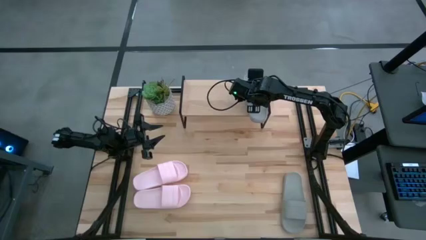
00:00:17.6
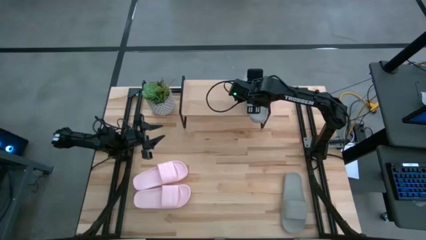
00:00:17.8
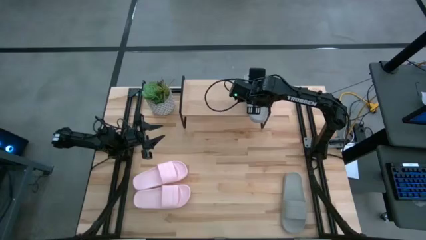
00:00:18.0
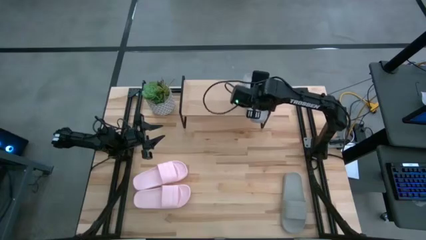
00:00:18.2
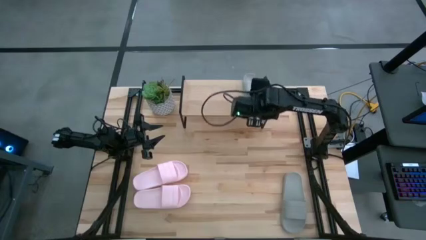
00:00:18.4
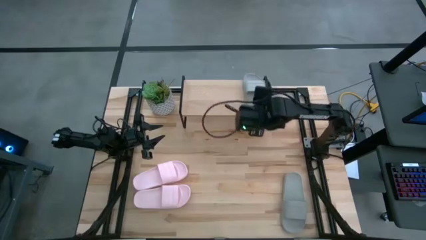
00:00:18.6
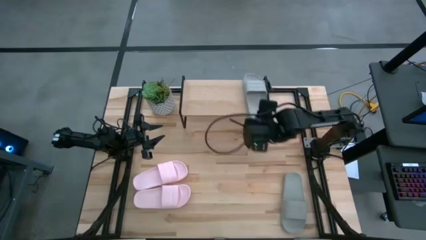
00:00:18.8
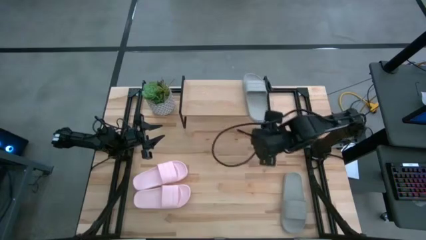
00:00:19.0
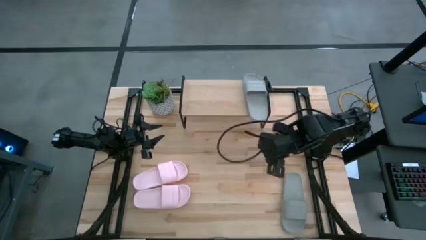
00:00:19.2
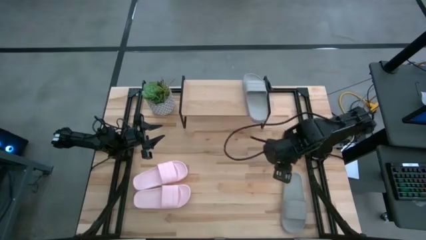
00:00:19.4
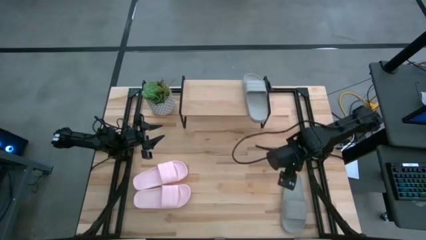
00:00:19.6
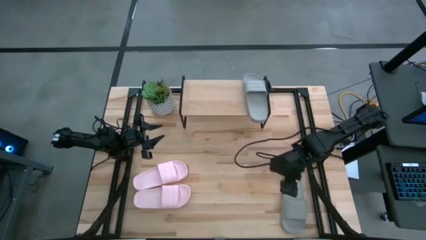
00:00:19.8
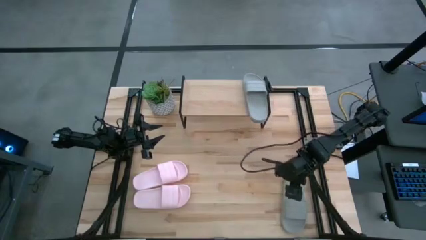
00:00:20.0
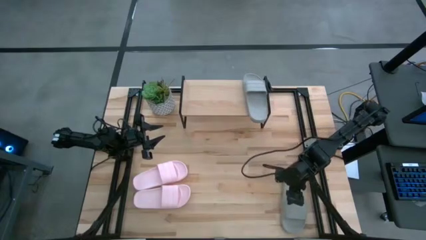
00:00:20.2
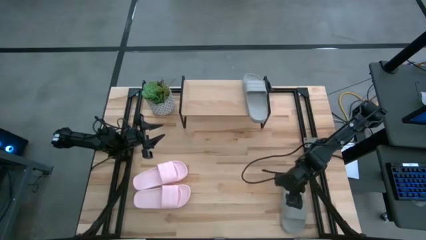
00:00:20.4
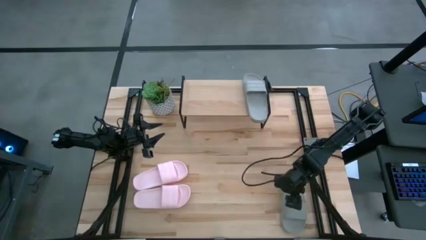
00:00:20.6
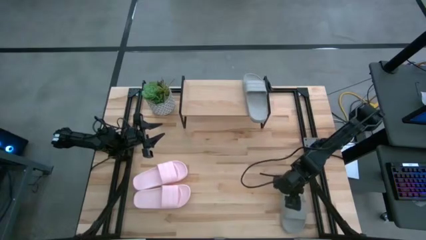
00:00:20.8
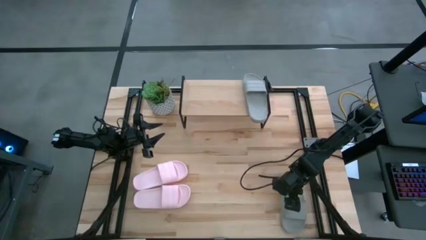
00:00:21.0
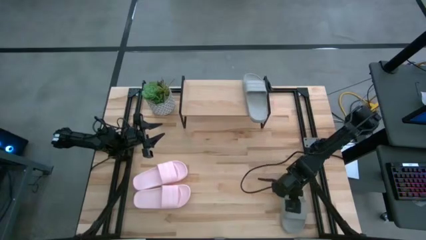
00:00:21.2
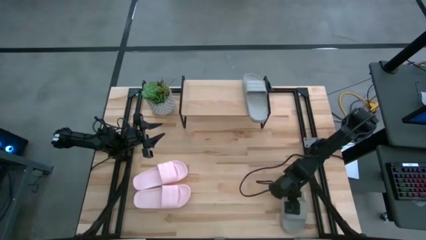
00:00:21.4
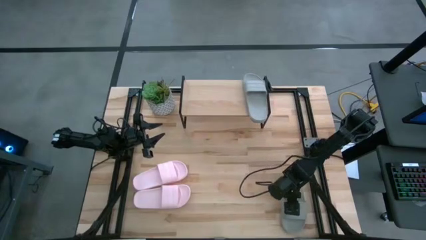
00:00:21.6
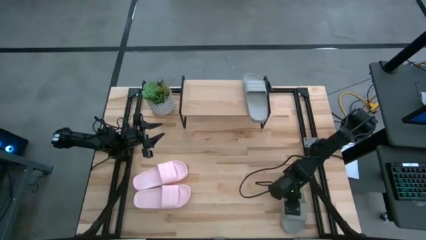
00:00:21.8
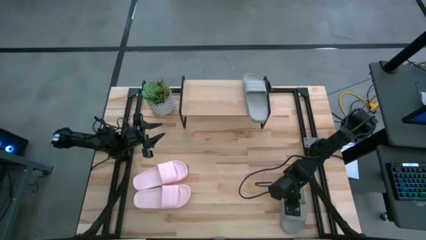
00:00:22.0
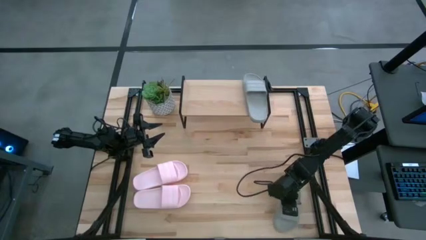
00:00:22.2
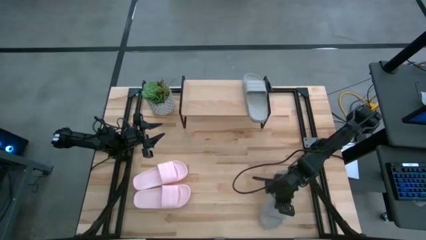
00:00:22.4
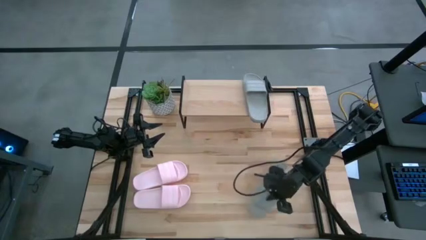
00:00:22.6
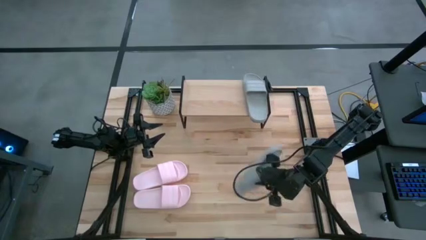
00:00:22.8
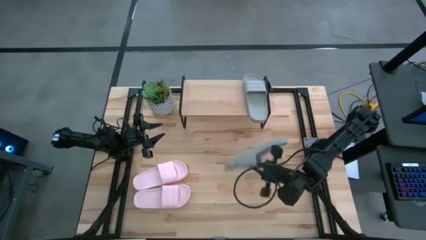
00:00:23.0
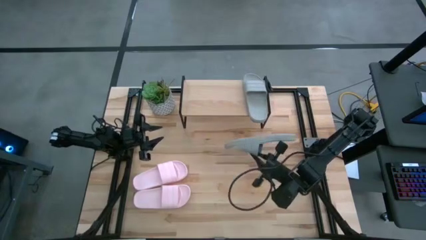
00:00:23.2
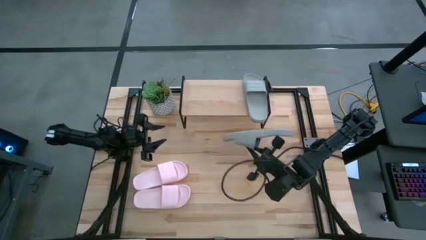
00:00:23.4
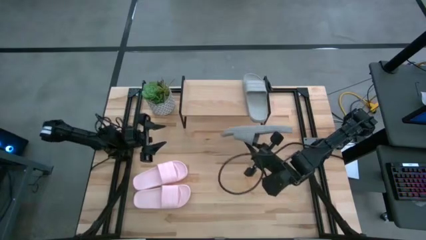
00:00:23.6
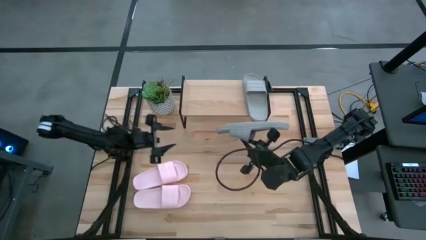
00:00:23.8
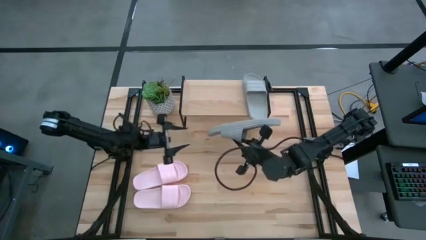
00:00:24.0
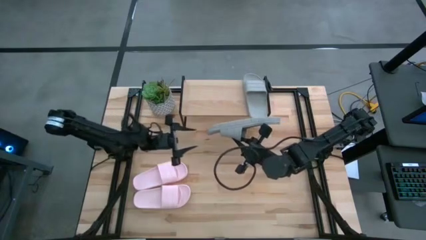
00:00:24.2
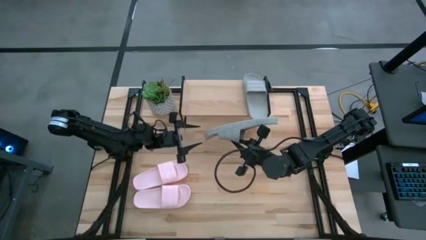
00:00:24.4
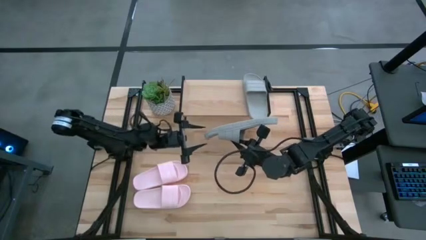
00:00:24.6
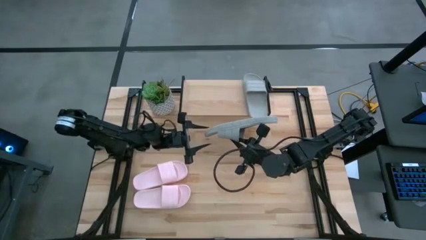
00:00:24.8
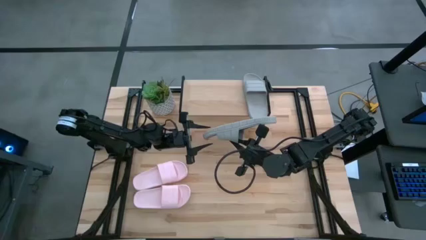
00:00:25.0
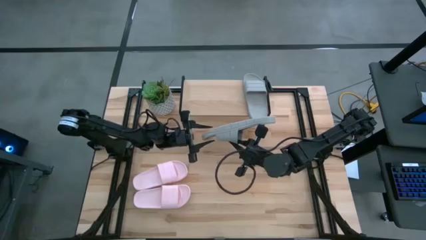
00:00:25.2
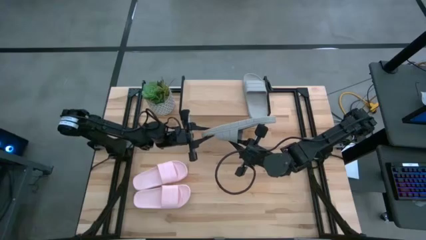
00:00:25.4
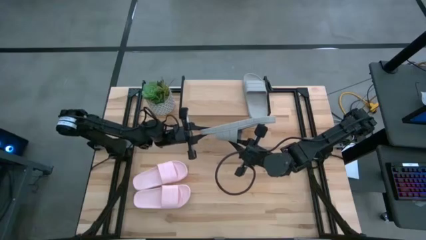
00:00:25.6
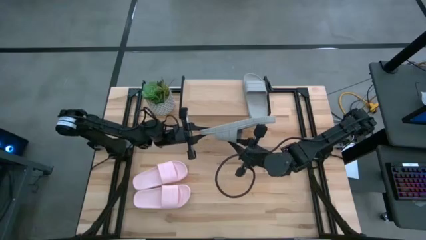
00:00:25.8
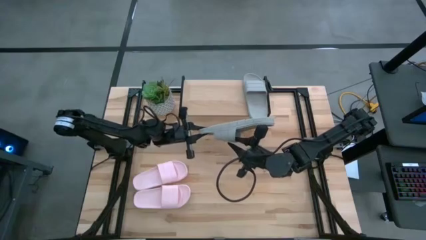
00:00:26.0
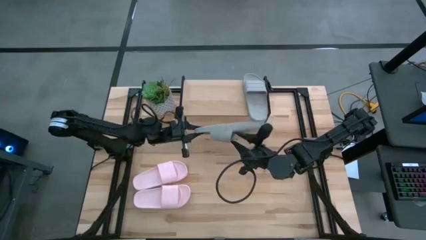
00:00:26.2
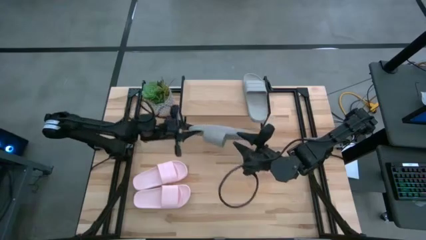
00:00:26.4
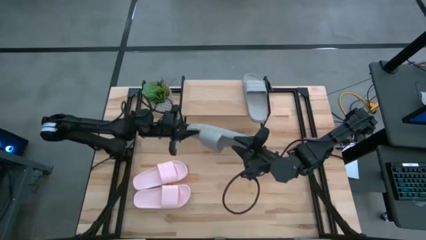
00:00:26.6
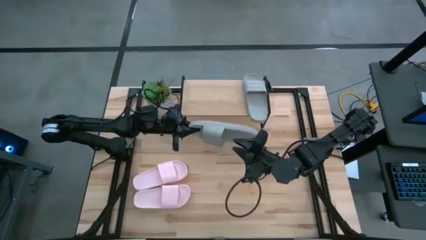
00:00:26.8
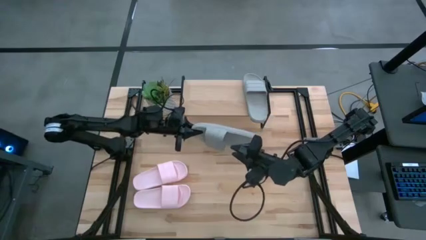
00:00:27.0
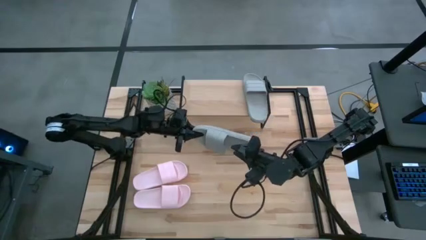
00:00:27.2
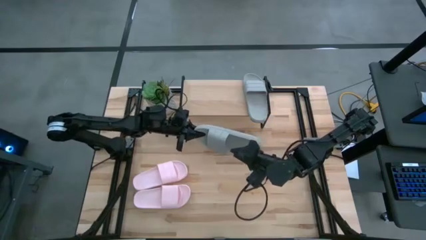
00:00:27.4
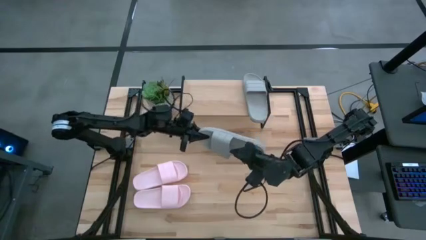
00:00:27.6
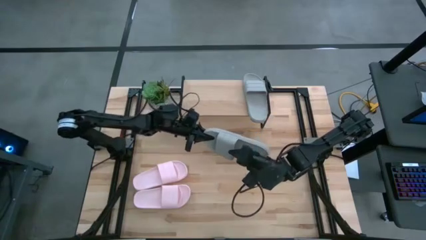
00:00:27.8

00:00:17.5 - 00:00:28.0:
Task: Pick and place slides into the shelf
Put the gray slides on the shelf

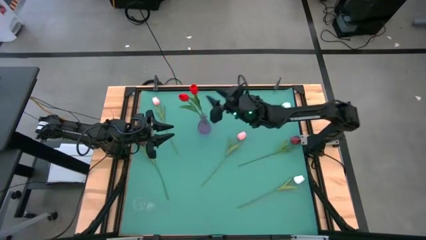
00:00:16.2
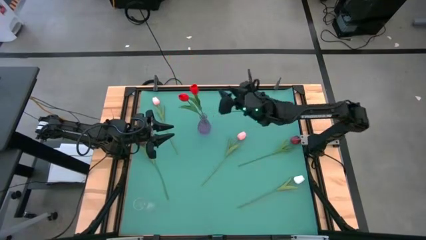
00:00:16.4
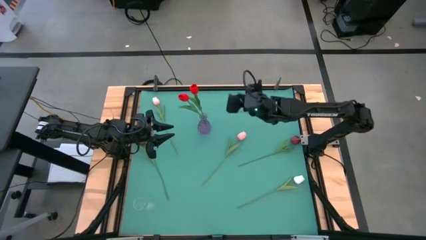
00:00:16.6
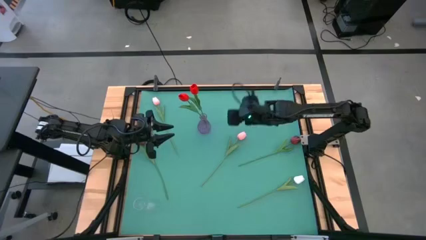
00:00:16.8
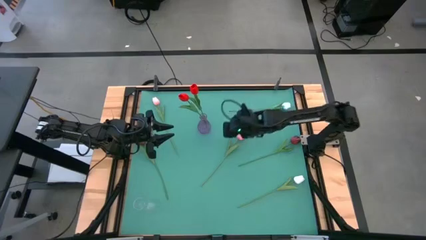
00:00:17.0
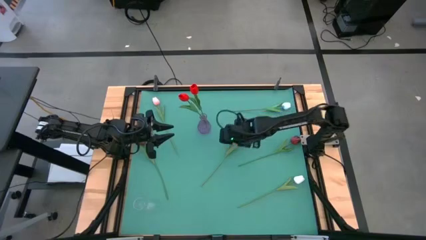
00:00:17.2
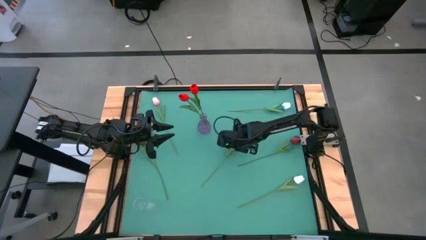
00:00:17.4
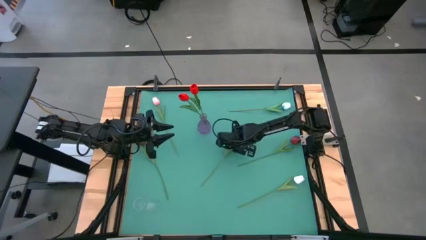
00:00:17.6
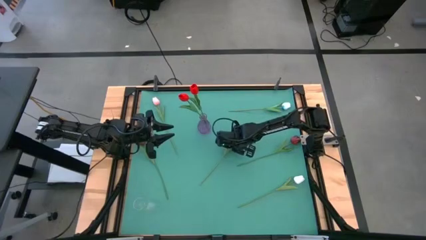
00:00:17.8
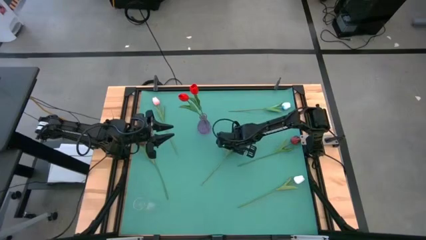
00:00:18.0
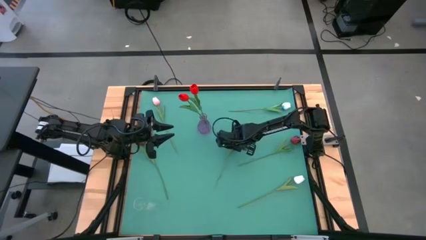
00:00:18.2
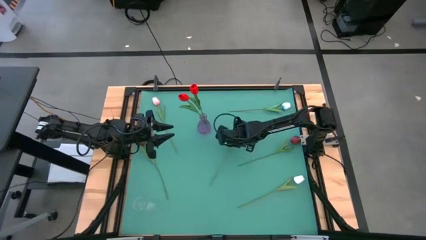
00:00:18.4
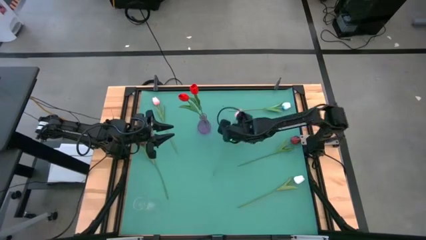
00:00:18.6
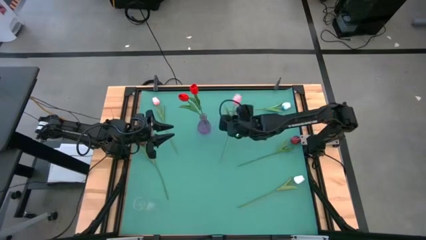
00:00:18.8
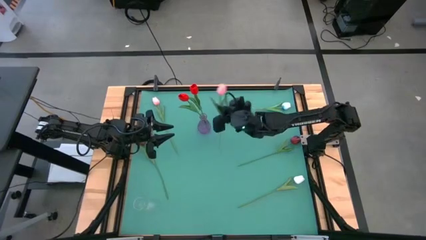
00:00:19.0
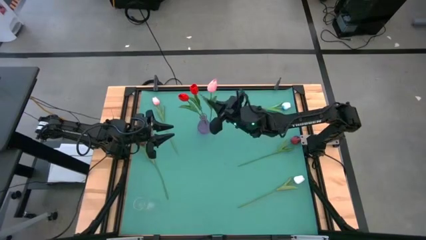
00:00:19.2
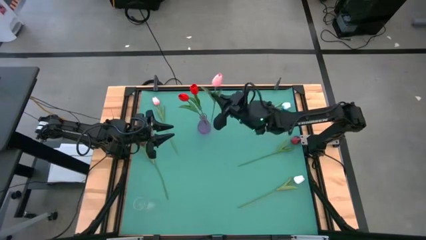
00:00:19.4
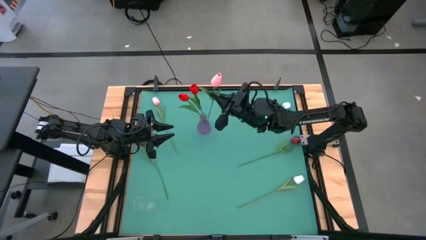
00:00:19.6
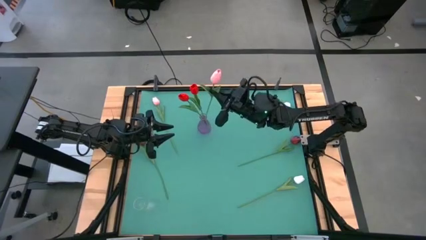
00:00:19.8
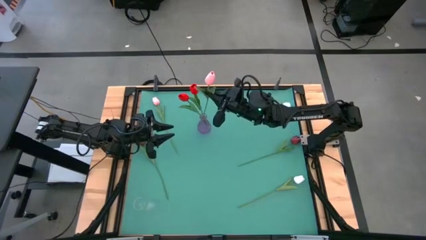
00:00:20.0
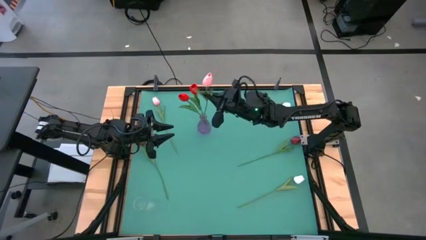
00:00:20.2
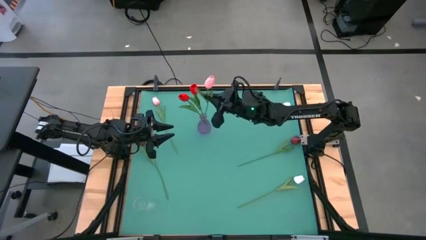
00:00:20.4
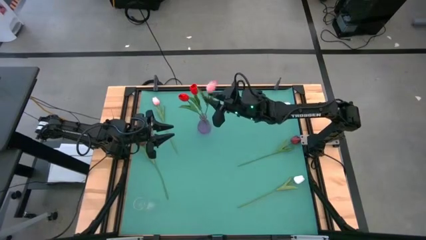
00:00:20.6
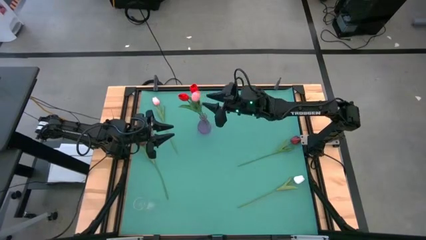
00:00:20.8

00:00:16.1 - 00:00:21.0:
Task: Sort flowers into vase by color
Put the right pink flower into the violet vase
